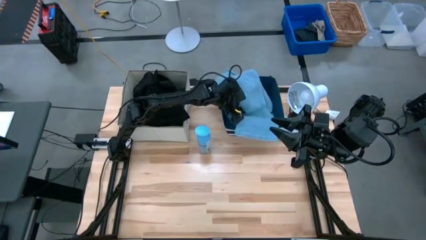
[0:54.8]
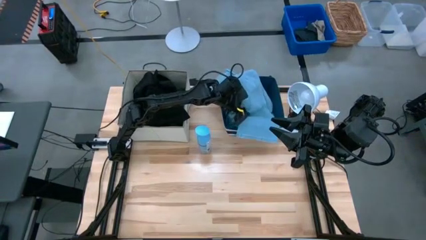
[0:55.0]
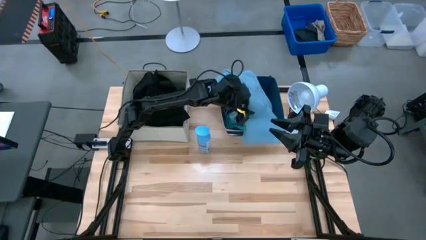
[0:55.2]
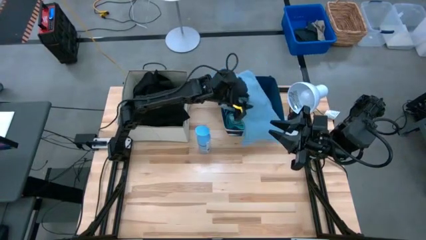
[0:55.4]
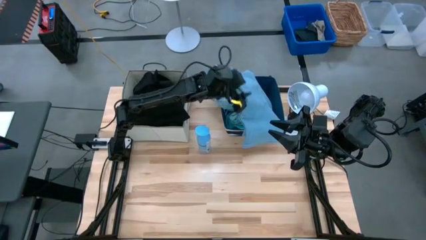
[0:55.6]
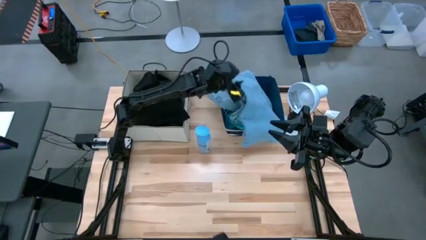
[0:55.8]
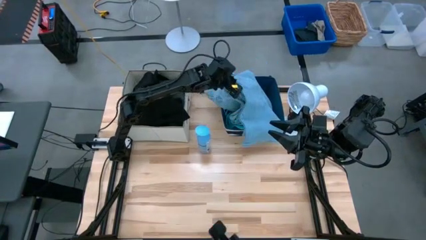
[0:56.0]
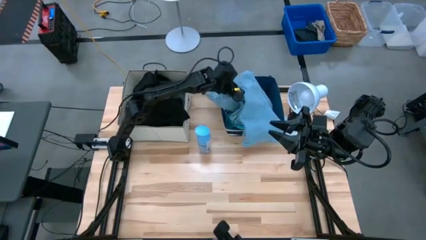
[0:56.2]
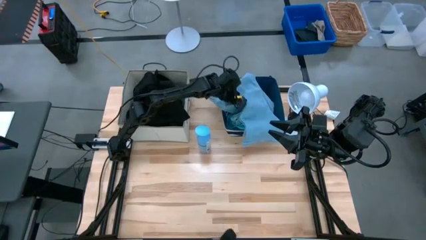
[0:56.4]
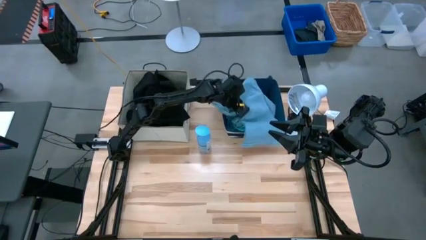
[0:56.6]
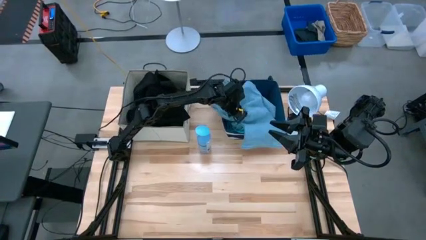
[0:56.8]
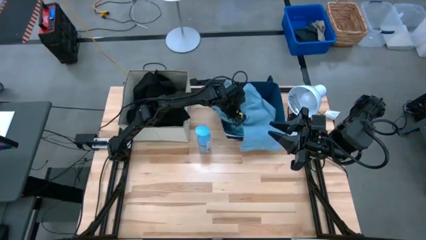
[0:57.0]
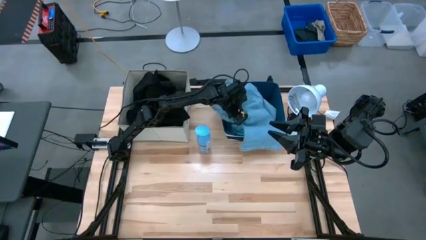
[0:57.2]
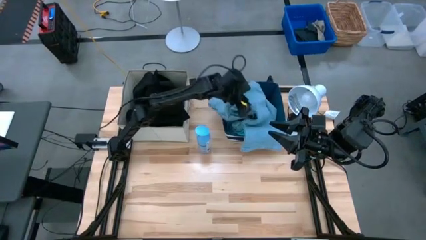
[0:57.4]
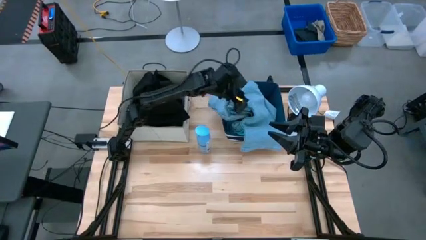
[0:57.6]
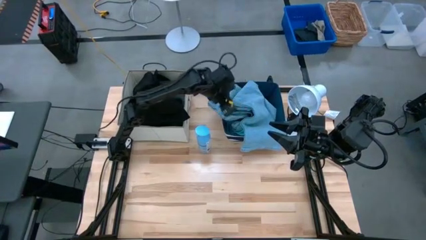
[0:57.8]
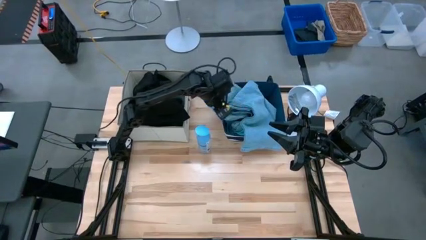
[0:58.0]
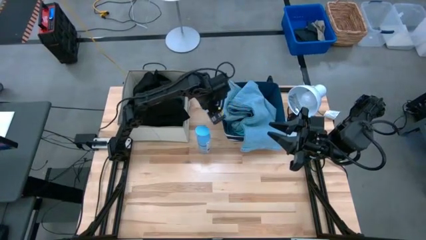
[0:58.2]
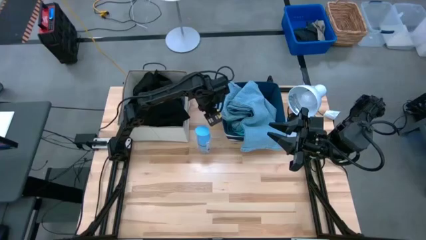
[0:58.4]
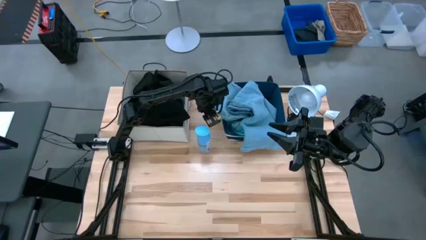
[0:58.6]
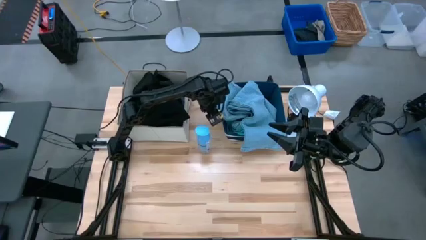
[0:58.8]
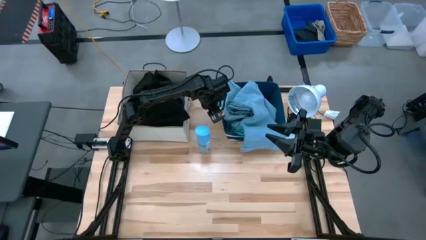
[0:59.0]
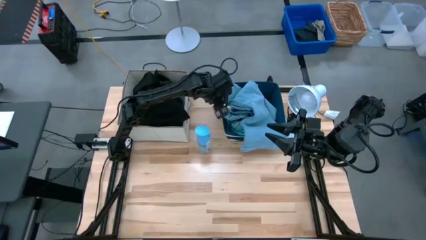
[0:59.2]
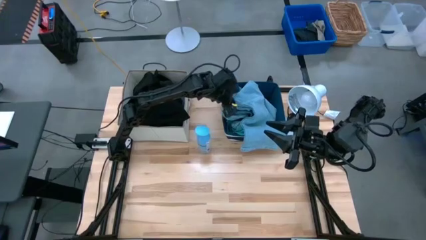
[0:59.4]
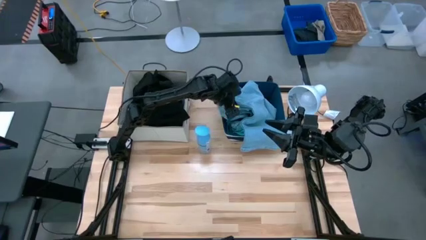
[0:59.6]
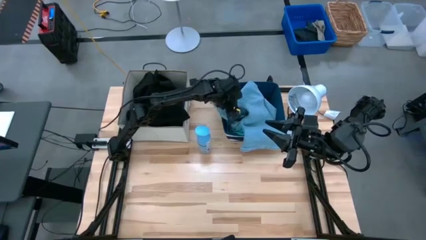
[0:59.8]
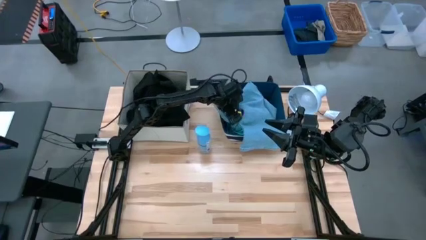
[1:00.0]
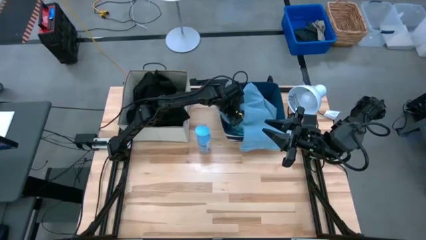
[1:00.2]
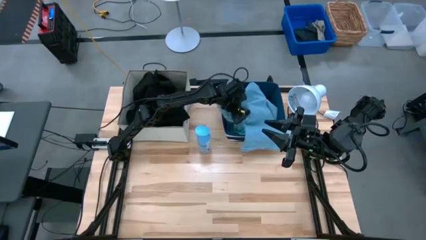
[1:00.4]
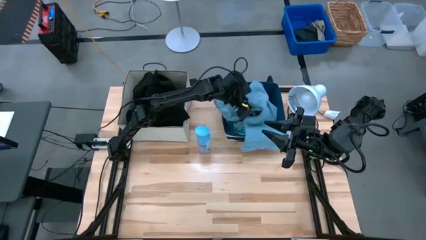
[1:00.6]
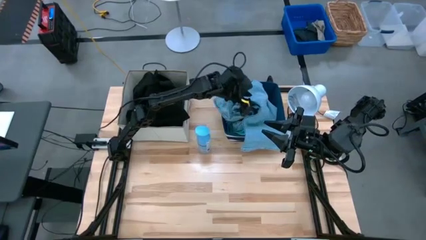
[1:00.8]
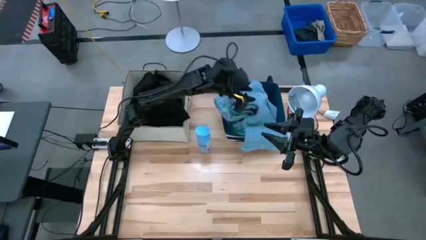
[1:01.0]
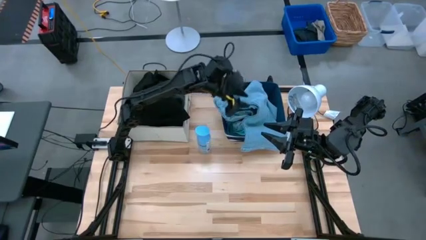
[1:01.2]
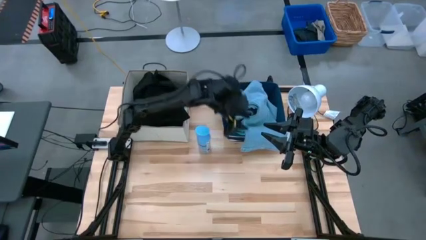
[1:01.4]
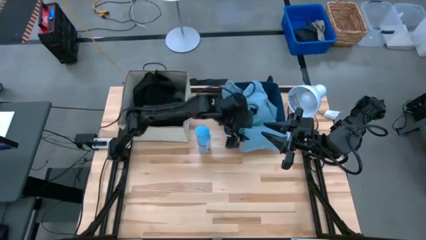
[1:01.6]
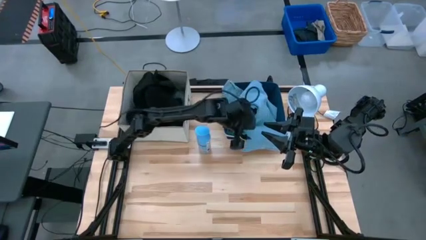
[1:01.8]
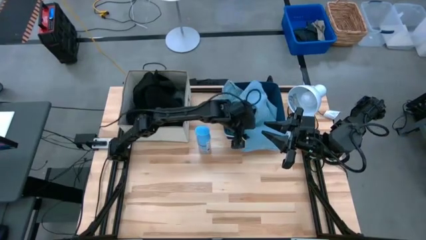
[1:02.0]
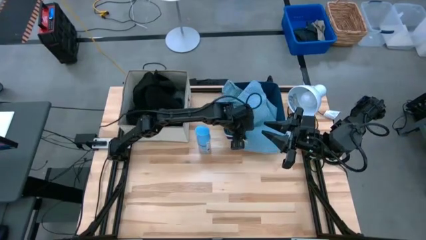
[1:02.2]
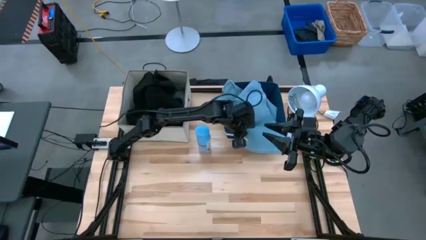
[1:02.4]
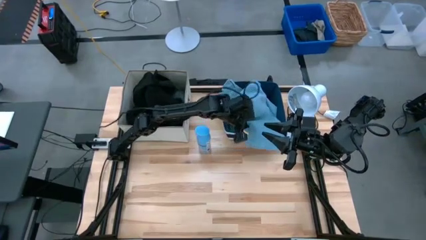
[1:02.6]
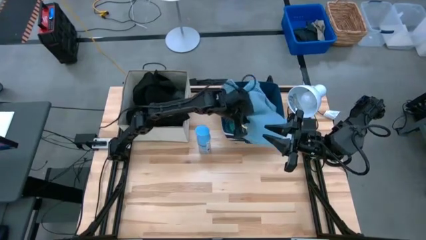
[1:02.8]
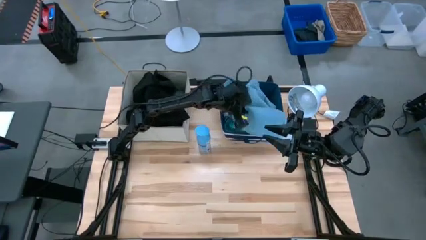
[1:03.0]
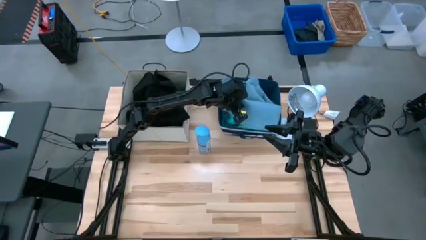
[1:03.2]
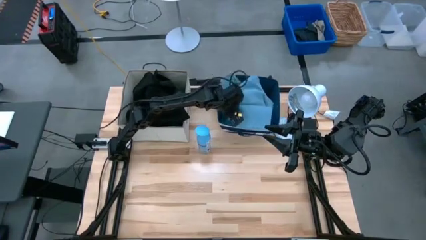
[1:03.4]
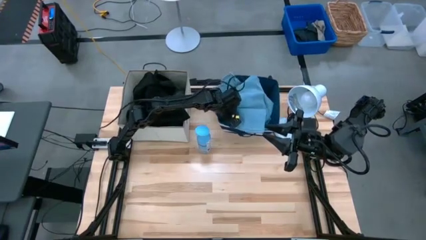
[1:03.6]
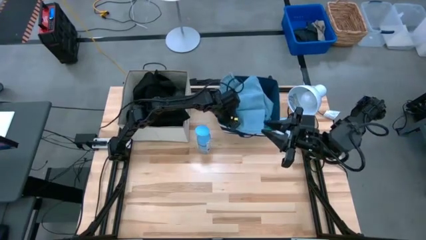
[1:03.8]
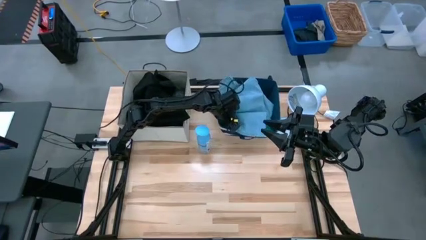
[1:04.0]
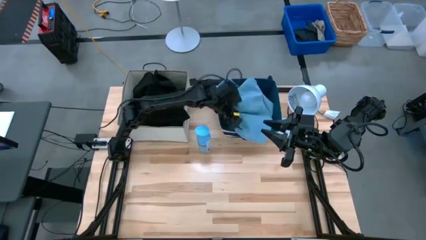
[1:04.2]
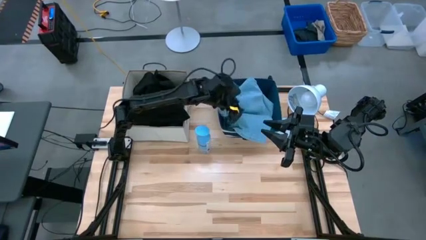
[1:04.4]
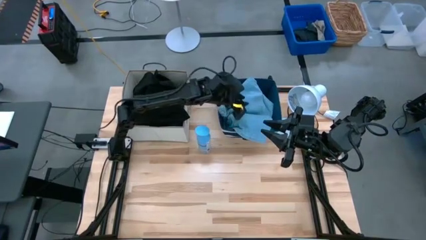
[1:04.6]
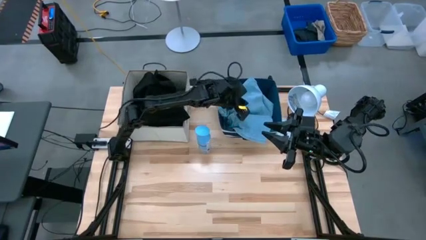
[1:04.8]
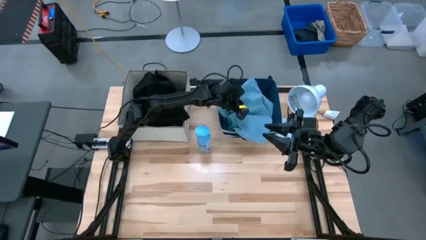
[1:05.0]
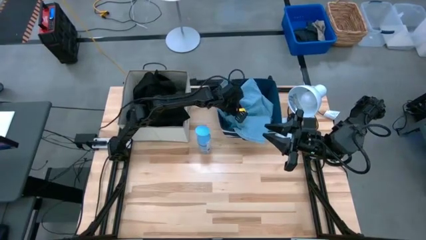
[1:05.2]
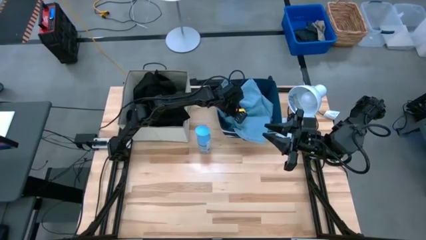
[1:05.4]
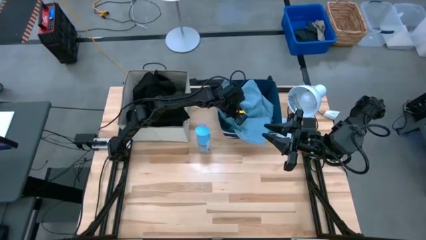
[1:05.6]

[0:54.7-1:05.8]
Task: Sort clothes
Put the blue pants into the blue laundry bin

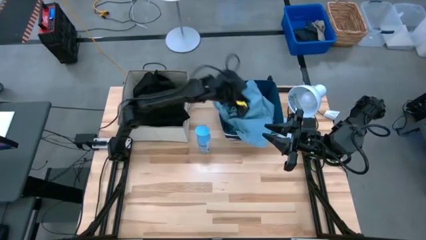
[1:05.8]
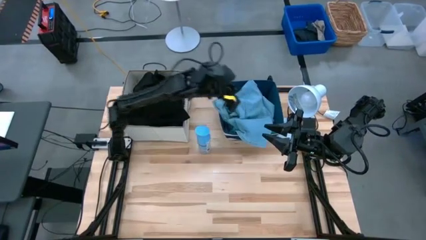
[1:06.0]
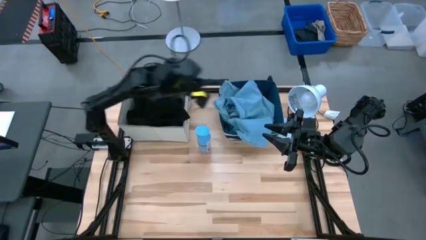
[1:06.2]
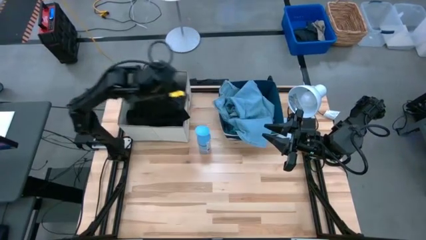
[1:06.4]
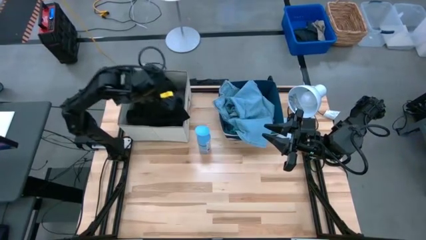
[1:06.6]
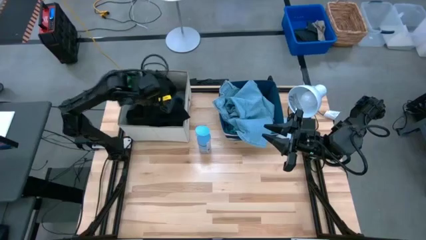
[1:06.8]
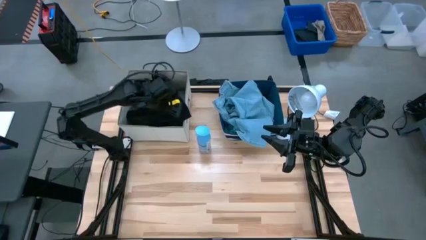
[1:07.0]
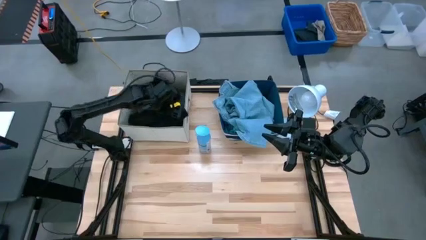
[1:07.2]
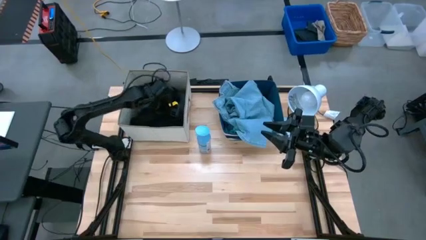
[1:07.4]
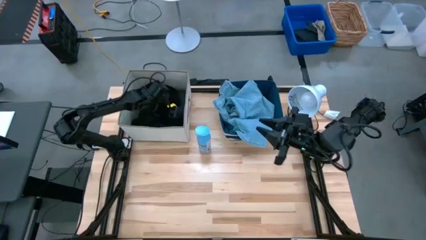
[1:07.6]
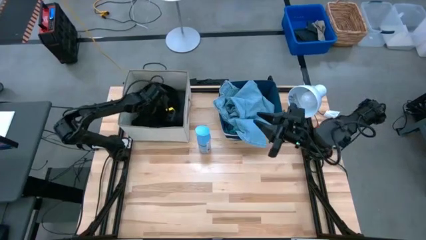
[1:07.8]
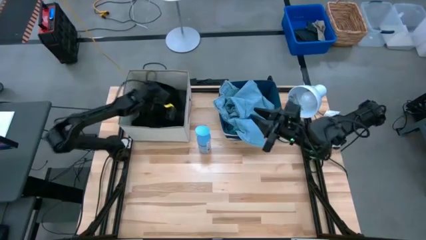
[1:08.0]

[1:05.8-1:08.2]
Adjust the black shirt on the laundry organizer
